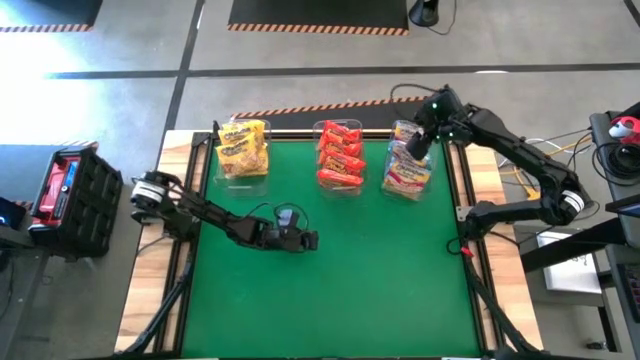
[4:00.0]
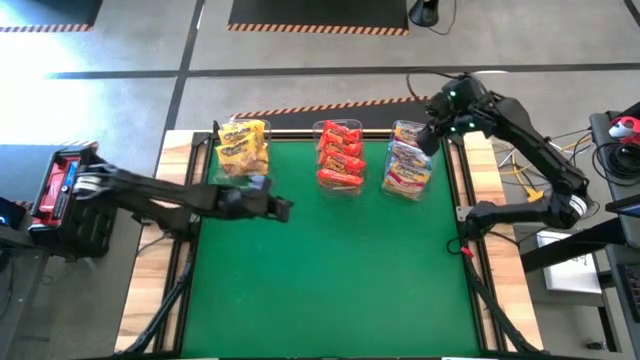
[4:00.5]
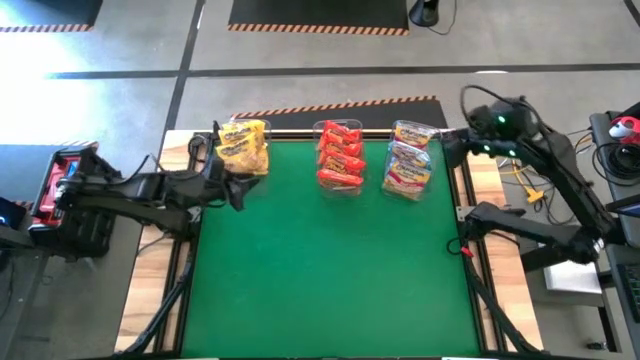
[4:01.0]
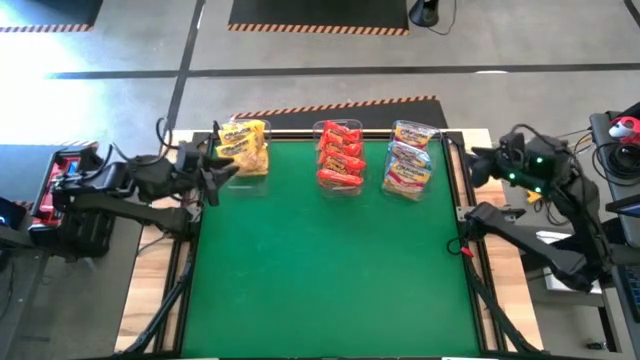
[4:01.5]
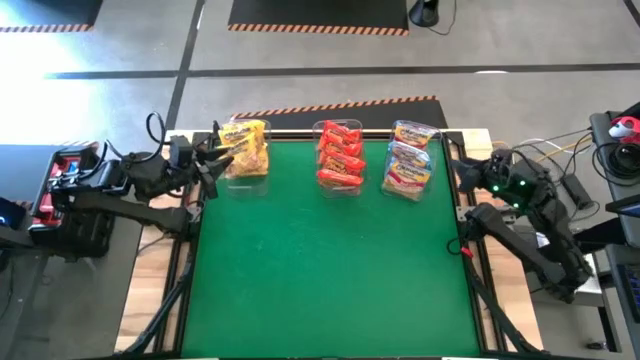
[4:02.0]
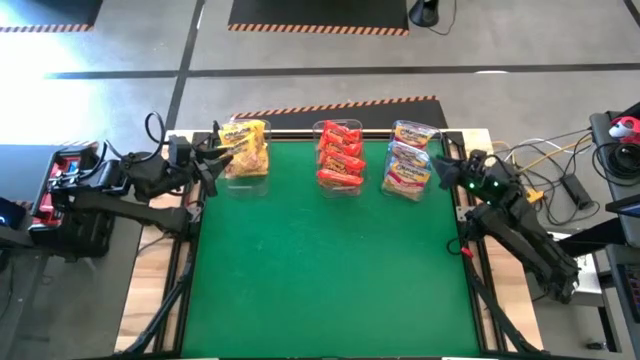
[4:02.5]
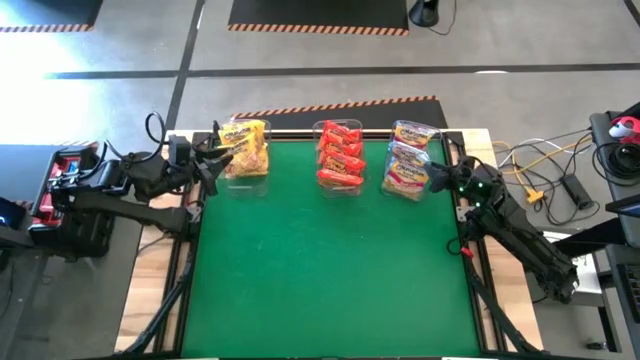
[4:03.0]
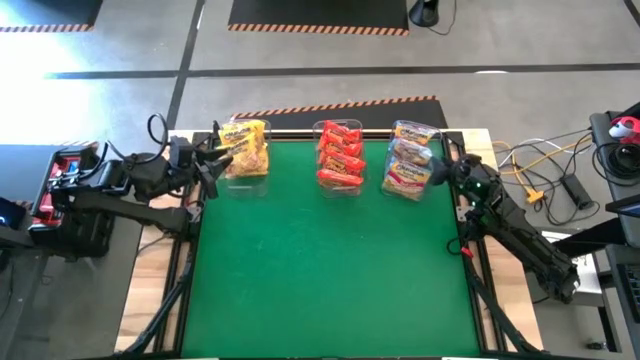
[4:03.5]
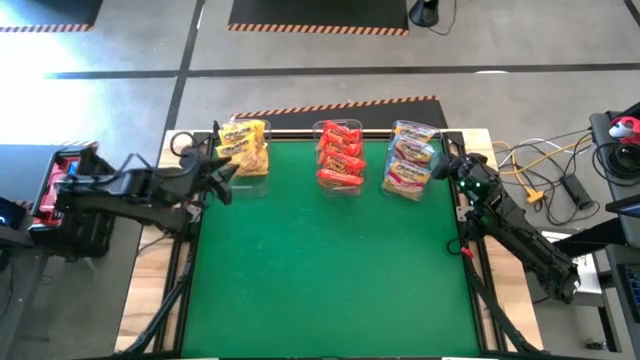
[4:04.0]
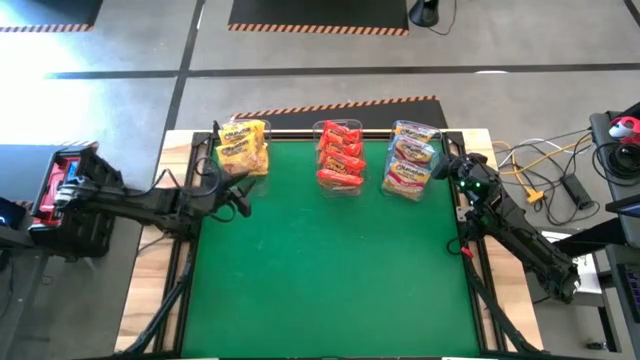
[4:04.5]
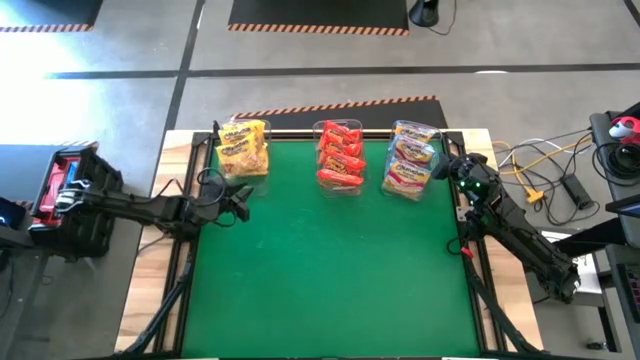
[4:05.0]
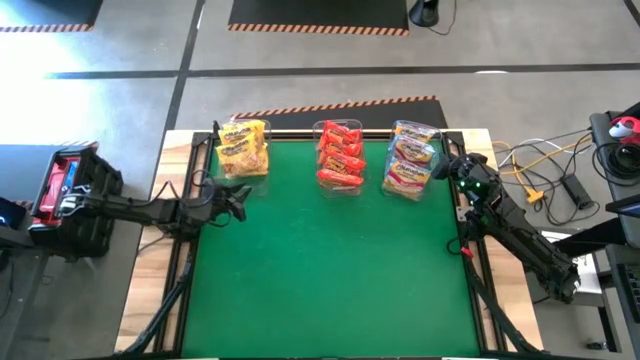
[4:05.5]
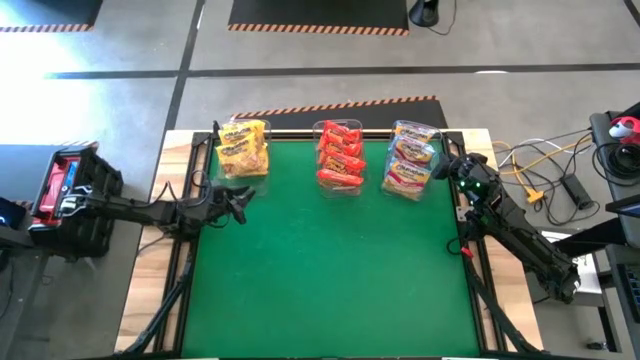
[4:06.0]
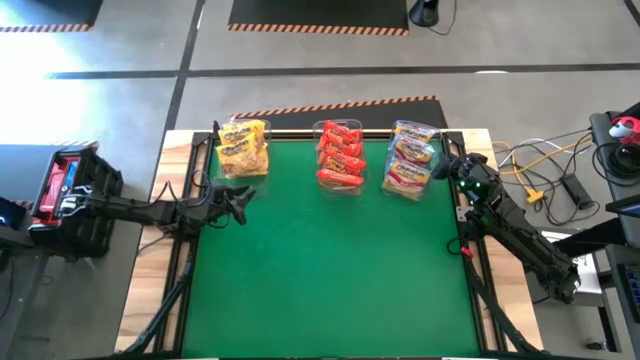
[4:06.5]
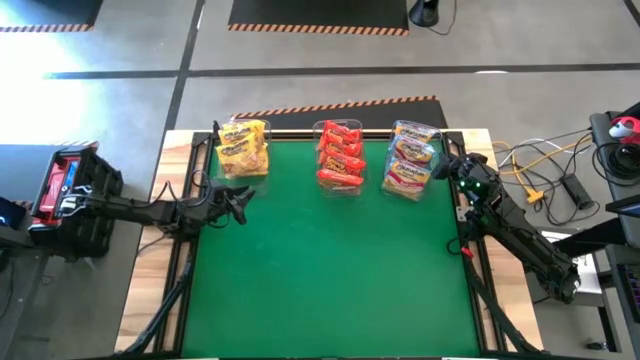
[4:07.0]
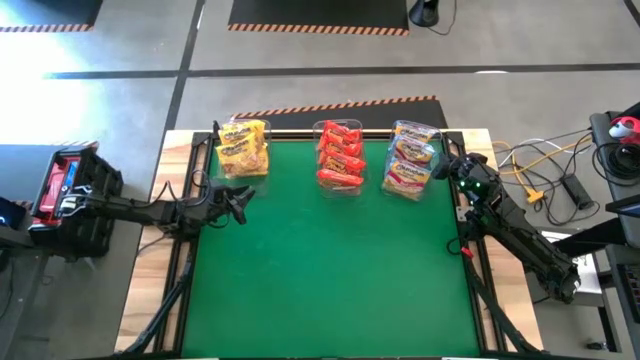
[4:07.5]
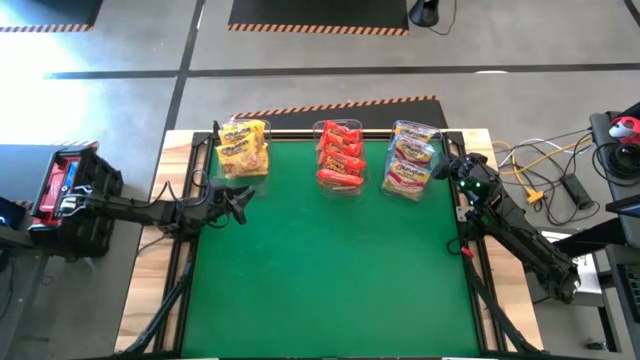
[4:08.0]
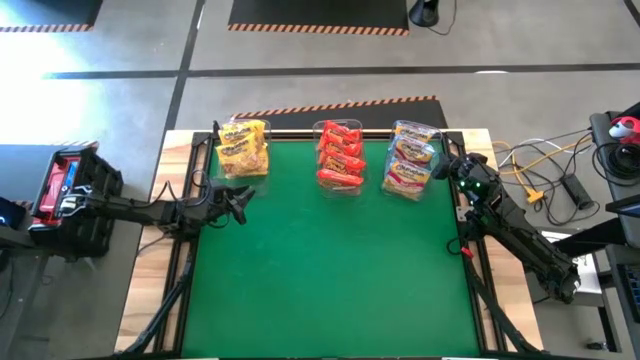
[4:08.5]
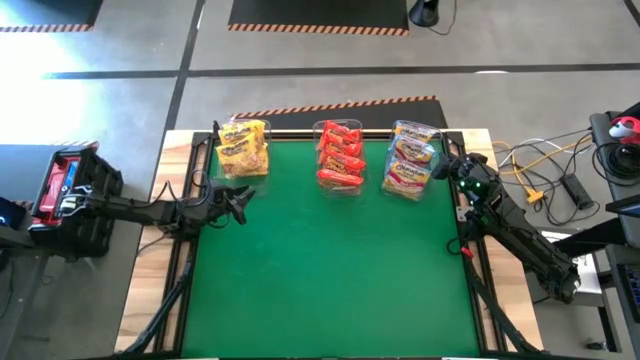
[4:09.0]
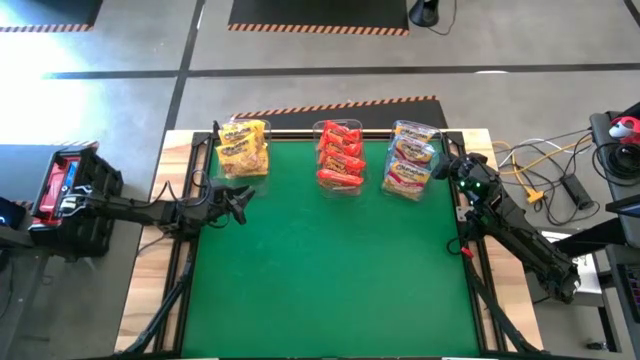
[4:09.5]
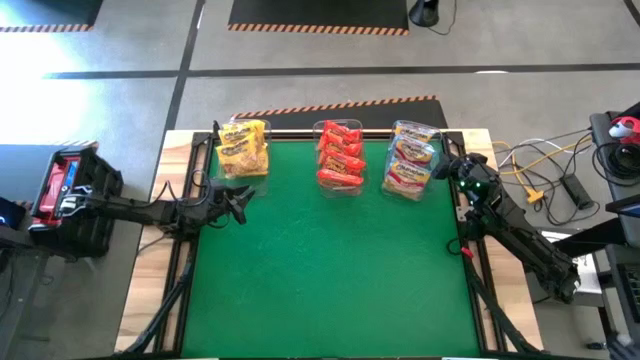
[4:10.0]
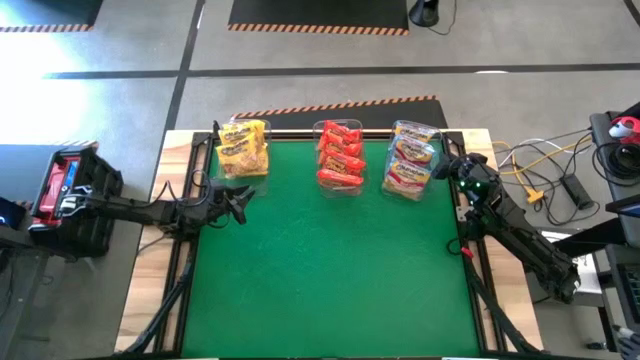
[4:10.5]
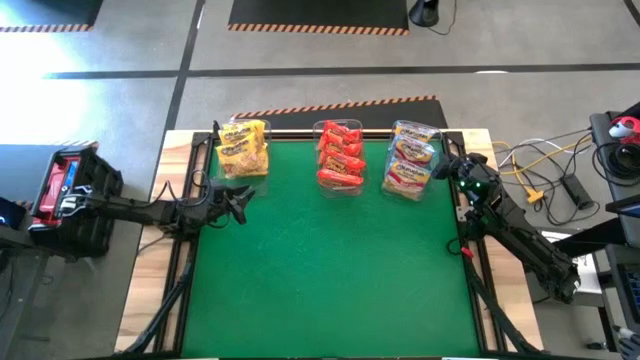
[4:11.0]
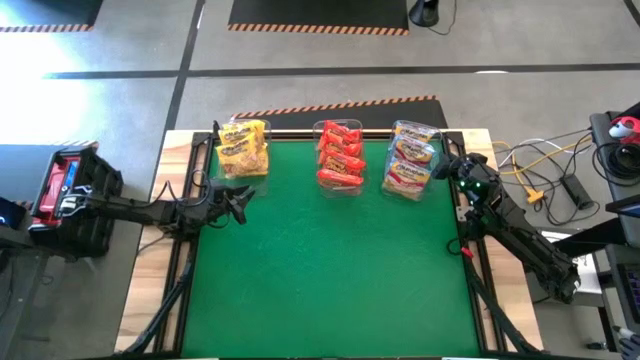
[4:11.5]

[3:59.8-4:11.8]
Task: Sort Maruchan noodles
Return to Home Position

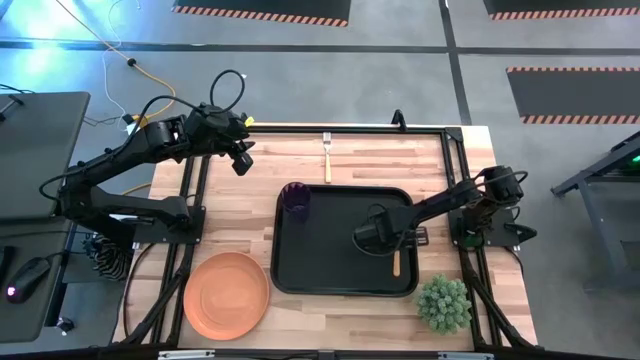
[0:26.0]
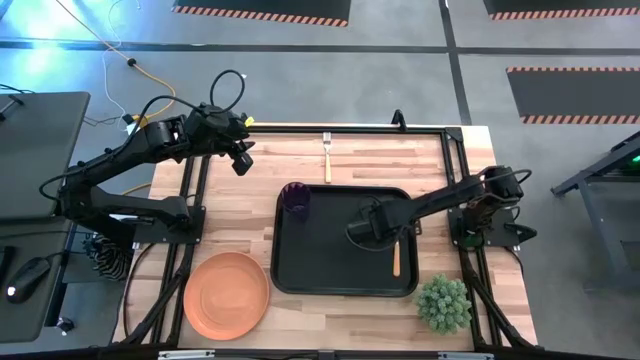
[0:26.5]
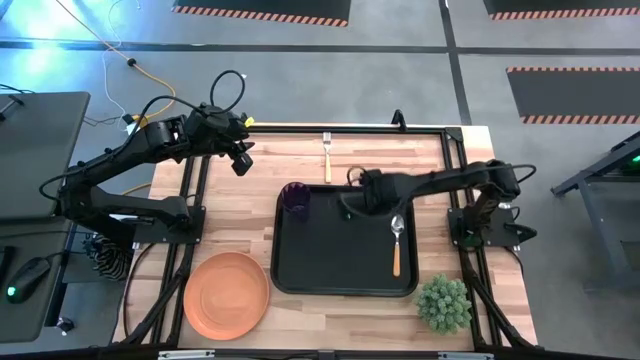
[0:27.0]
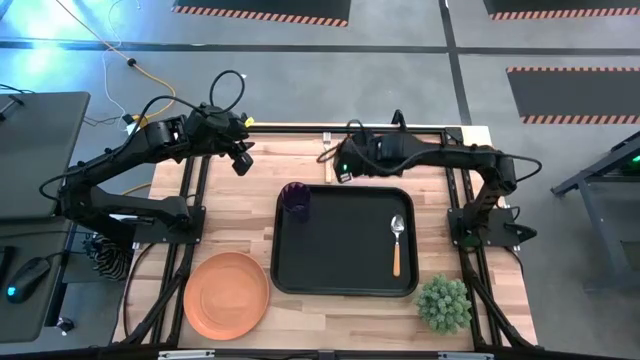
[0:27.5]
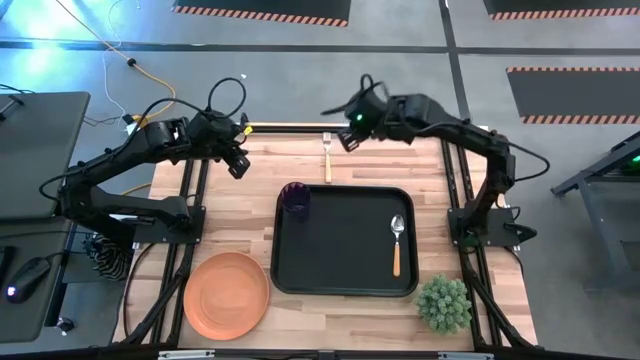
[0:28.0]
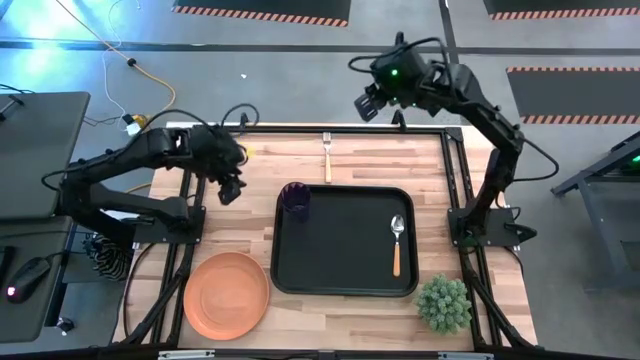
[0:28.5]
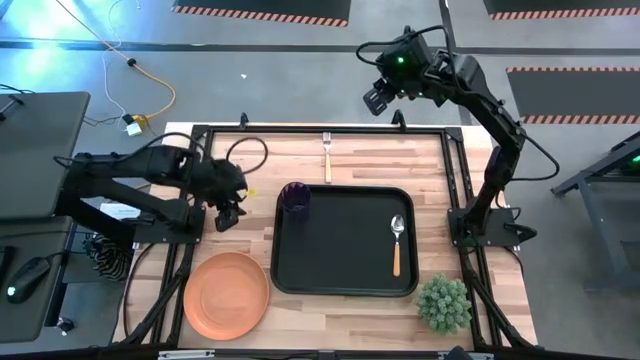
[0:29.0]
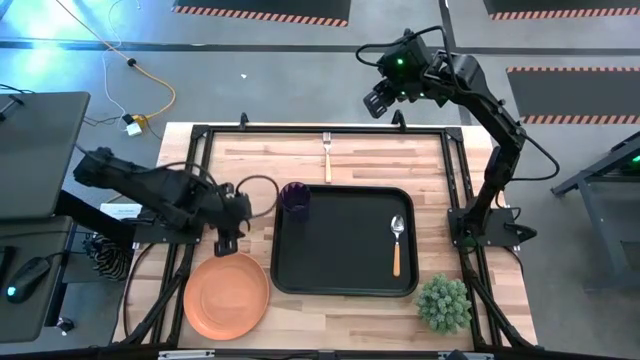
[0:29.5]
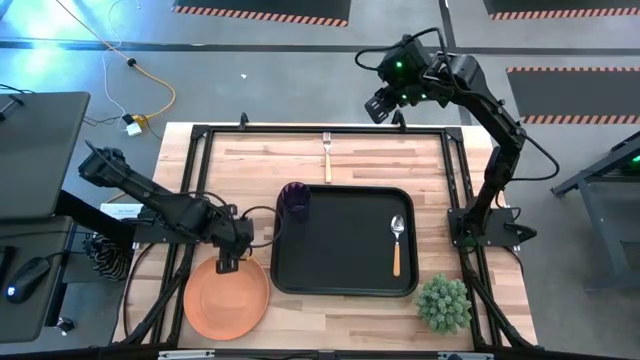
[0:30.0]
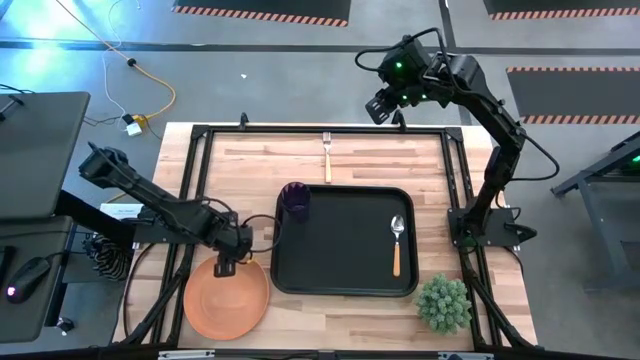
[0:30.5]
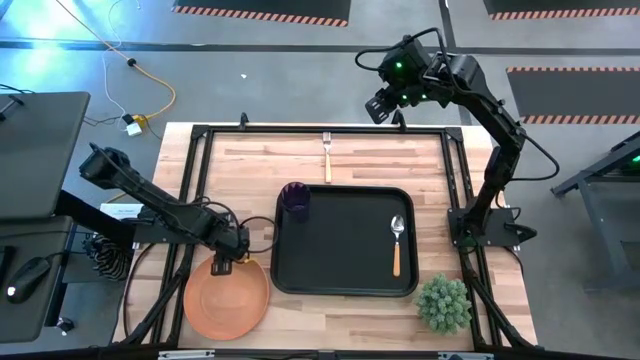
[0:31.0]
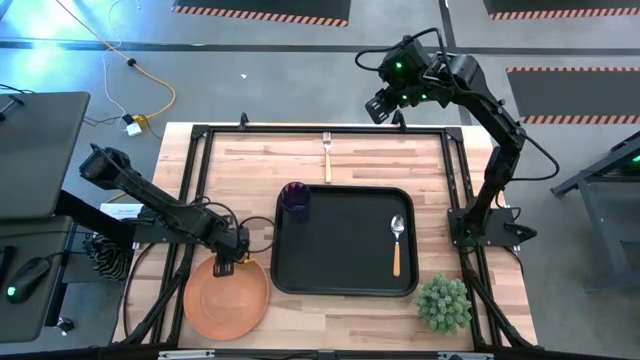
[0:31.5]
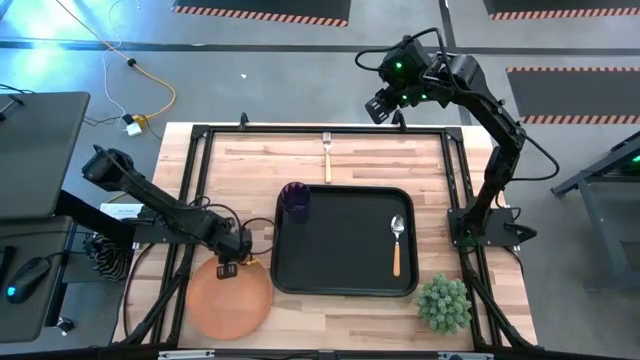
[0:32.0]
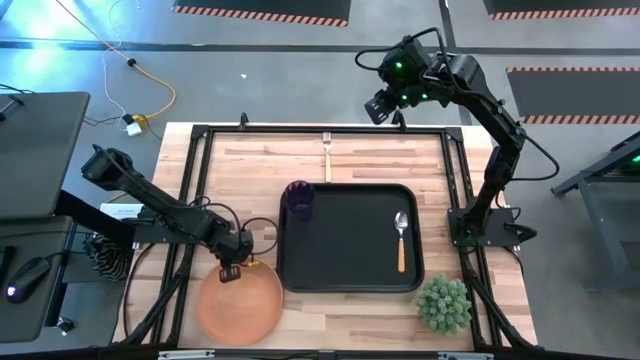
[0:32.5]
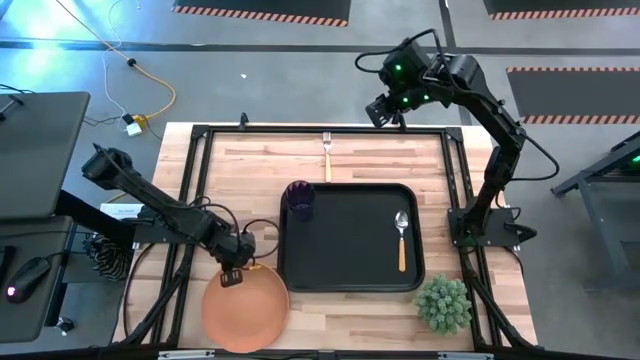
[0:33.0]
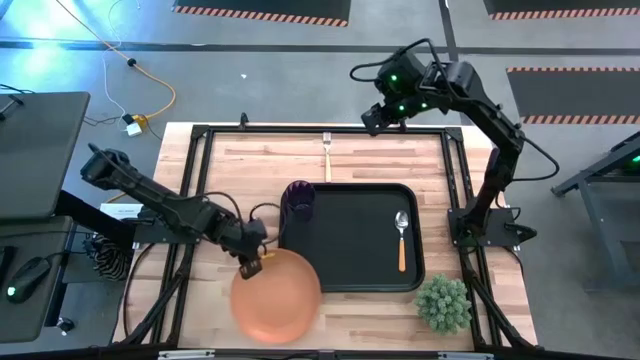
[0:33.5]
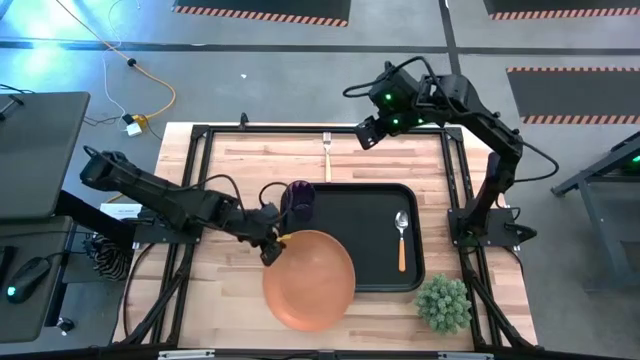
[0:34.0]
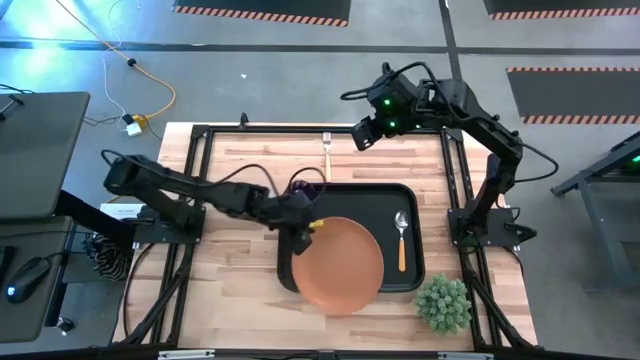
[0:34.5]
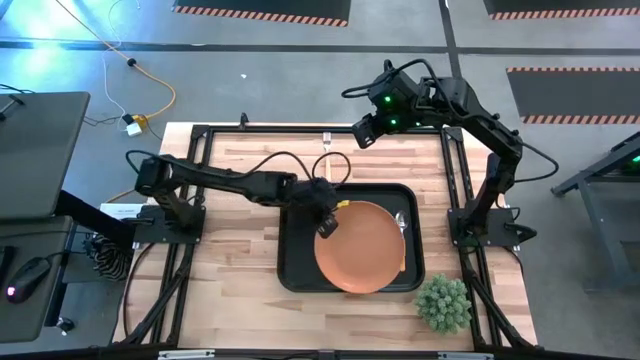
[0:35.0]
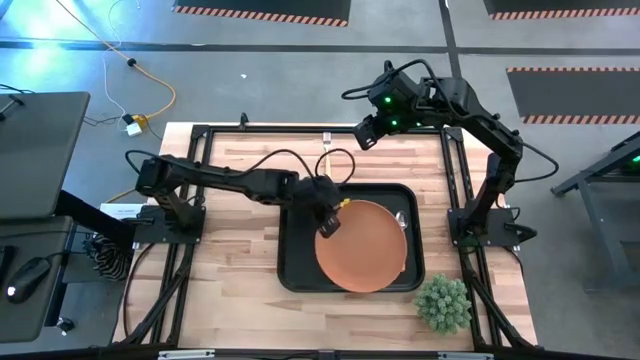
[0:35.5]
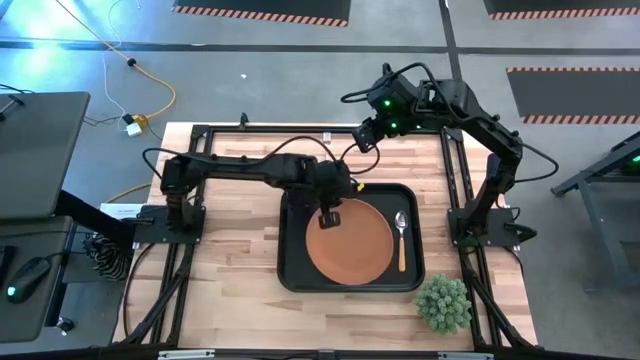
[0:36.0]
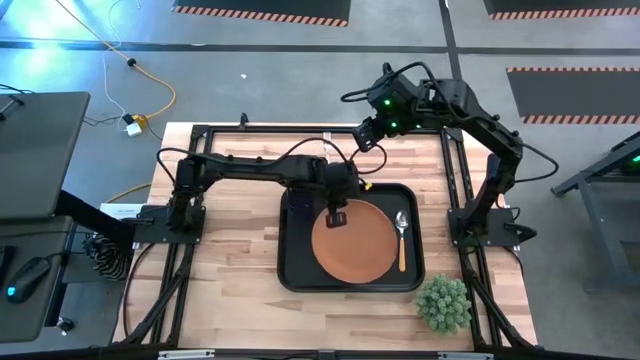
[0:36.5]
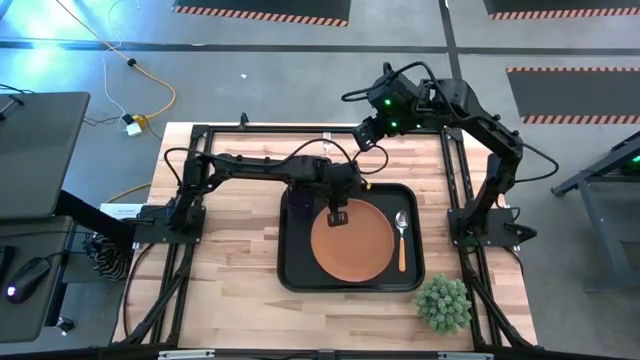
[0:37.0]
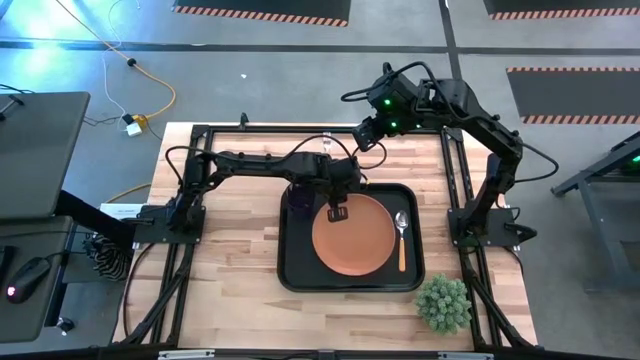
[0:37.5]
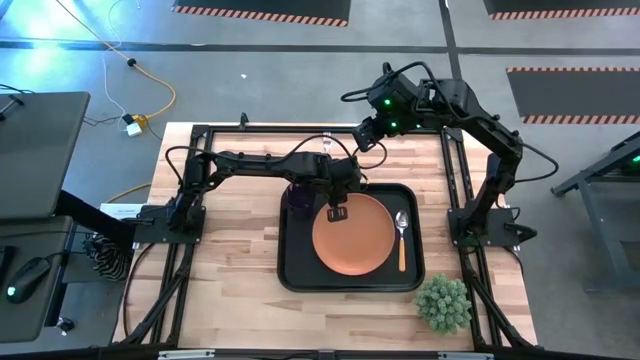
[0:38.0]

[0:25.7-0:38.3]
Task: Pick and place plate/cup/fork/spoon on tray
Put the orange plate on the black serving tray to the left of the orange spoon
